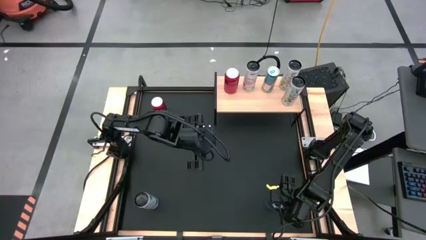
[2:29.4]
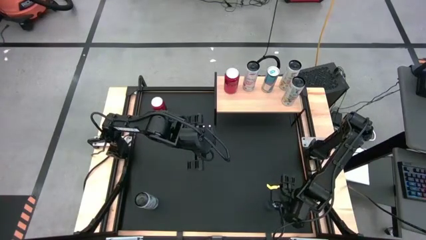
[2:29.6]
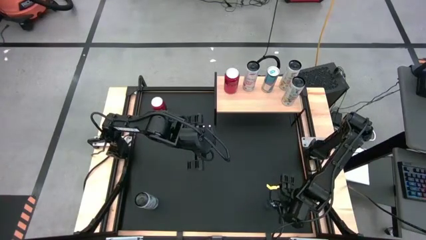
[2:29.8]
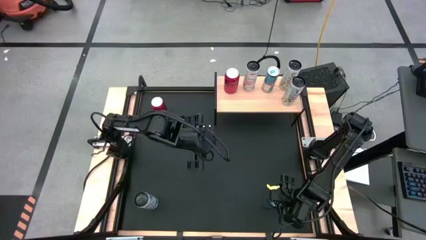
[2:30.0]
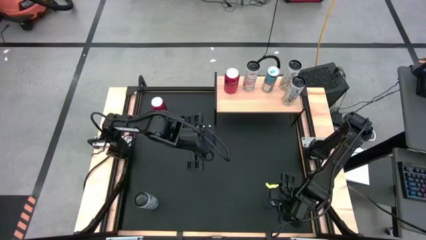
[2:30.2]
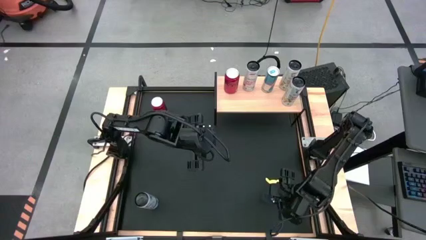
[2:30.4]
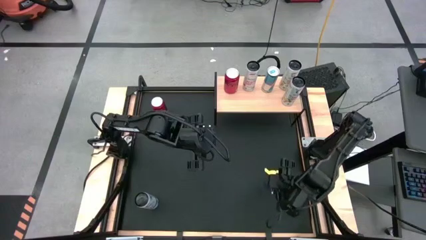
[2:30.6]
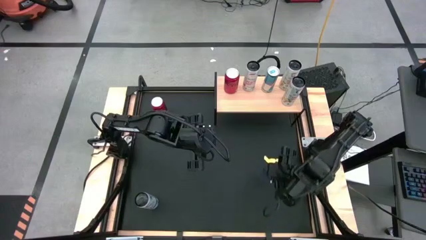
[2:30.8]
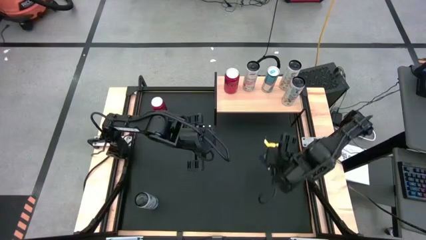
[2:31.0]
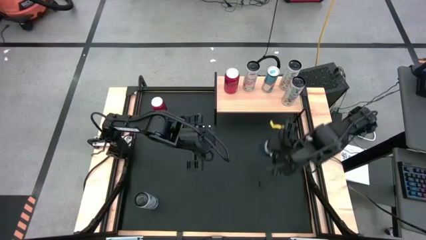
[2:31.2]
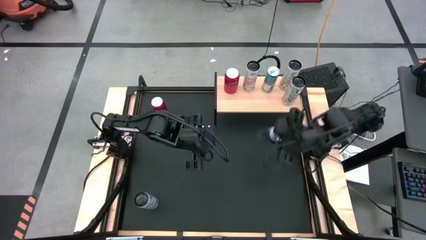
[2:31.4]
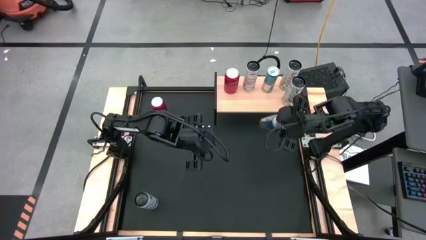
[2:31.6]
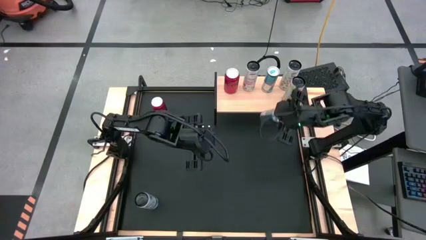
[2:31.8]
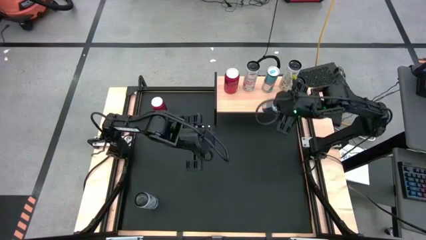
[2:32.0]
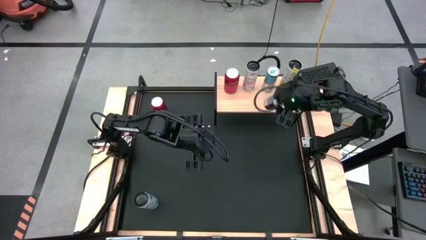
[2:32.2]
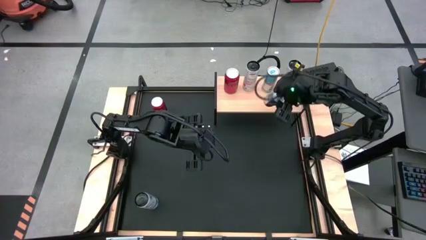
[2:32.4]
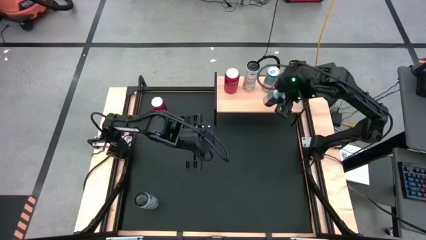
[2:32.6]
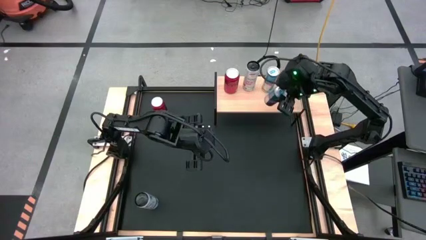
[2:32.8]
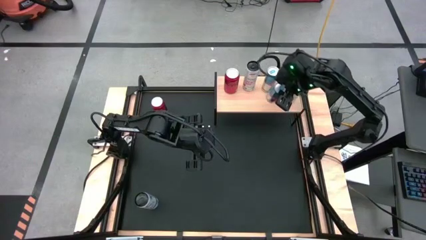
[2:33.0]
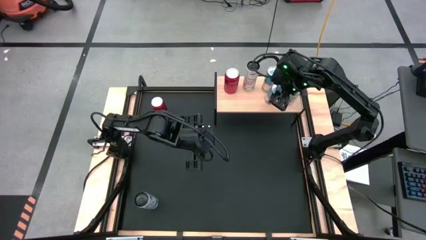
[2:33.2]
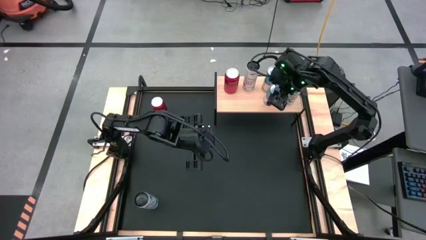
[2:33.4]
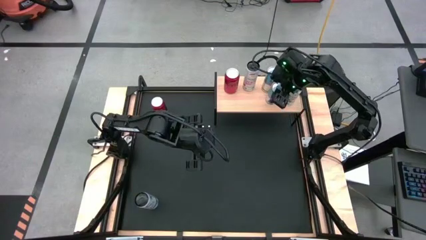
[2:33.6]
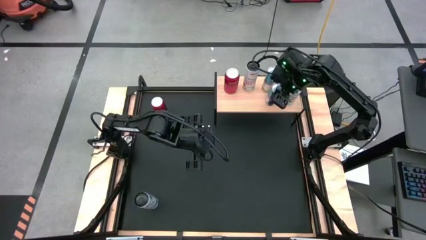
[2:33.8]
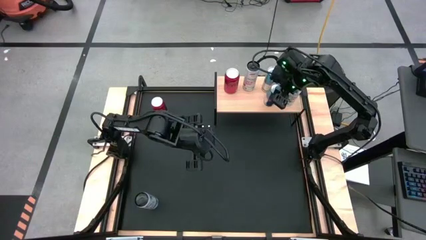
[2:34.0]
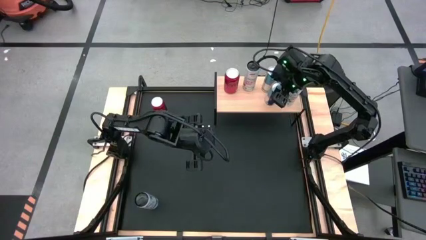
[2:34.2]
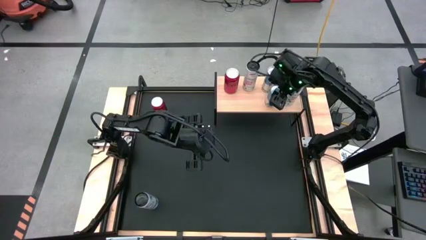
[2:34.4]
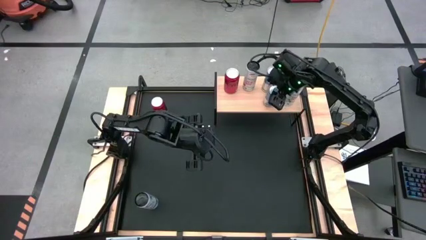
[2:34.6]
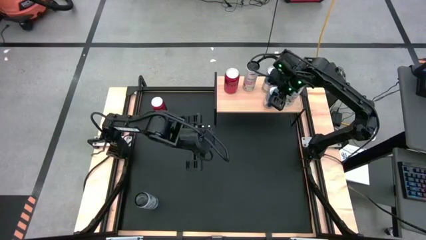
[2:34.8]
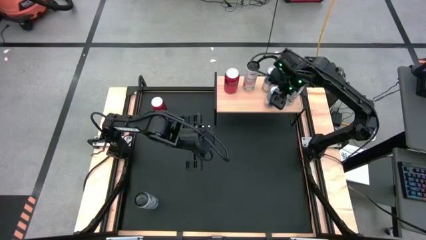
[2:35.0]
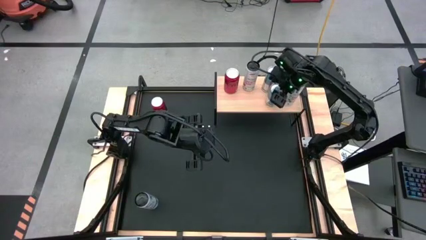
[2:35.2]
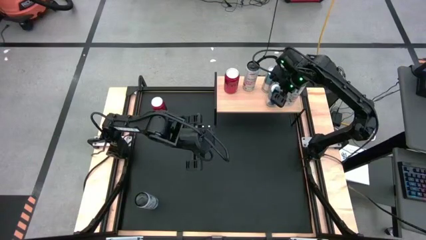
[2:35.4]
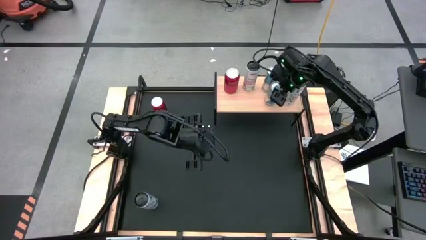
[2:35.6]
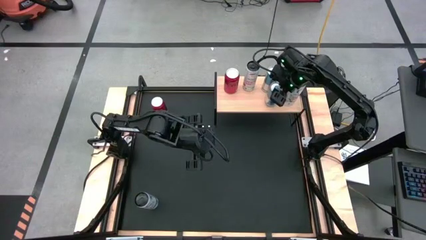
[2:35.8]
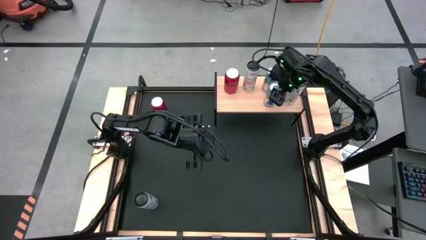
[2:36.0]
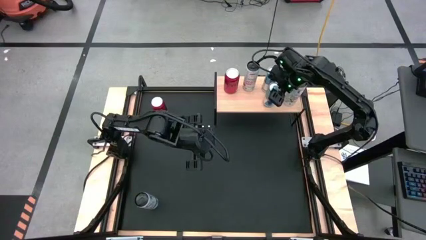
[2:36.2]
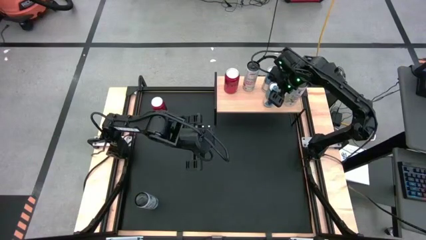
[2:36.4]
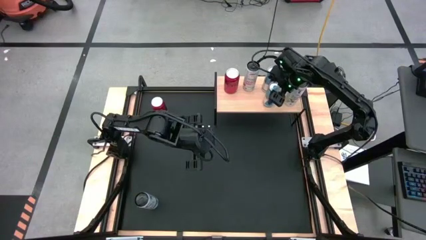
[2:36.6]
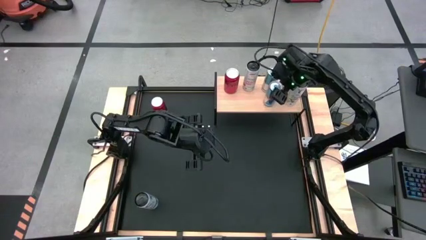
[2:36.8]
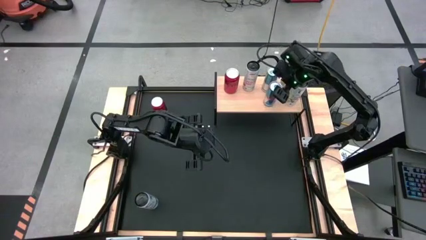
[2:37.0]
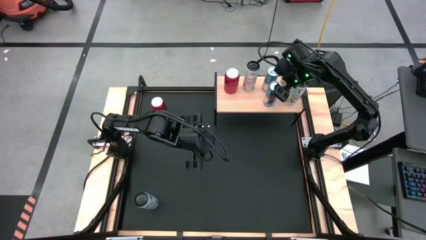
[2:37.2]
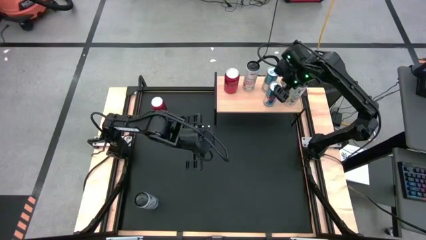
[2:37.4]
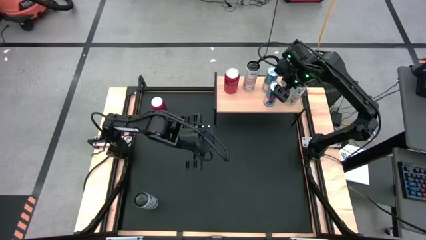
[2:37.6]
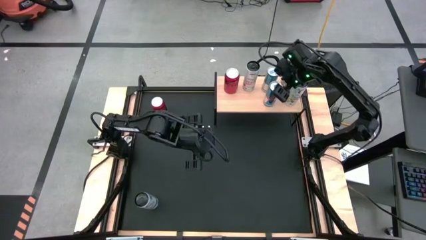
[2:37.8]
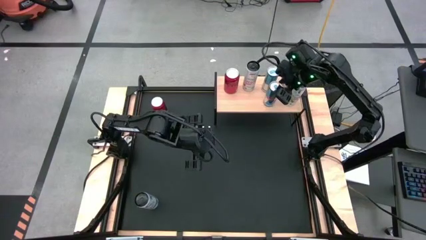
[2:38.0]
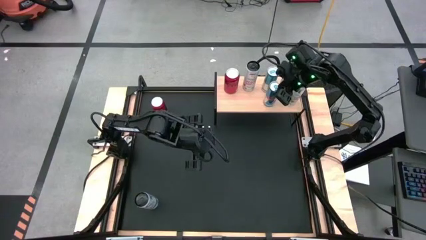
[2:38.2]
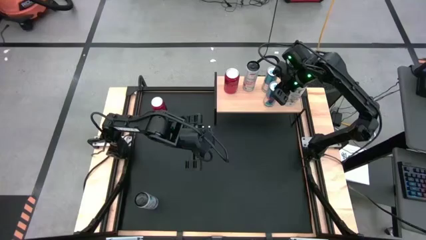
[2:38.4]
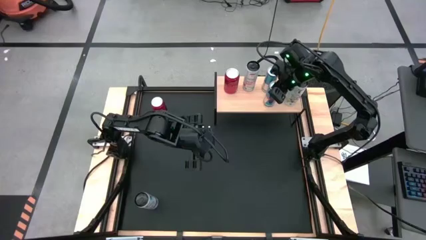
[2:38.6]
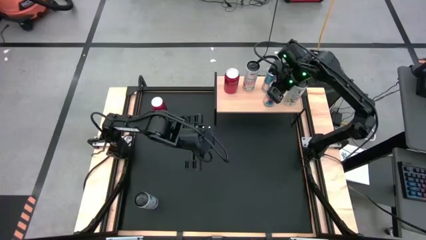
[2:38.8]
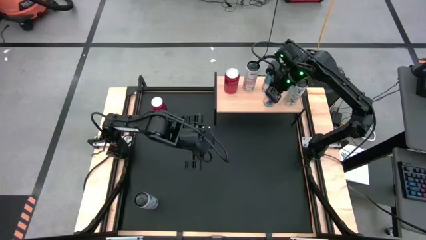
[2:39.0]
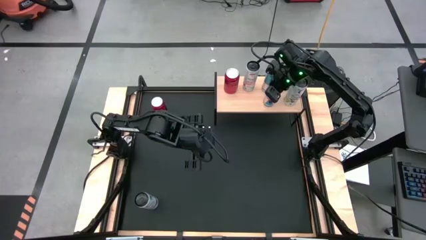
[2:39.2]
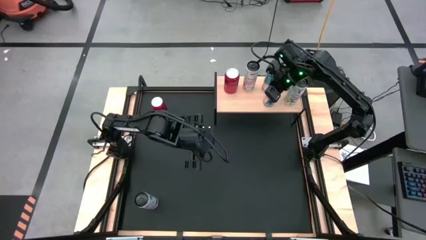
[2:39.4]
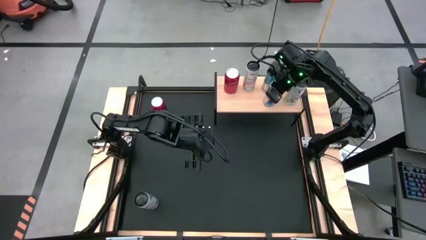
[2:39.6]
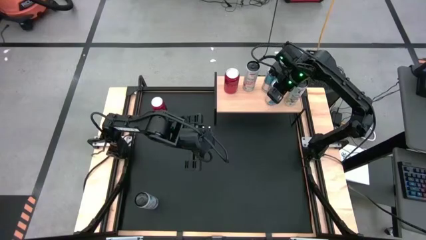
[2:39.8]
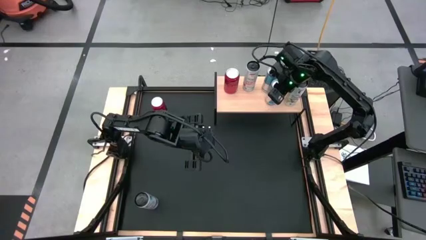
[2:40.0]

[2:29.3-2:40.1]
Task: Place canned beverage on shelf
Put the blue soda can on the shelf aligned with the other blue soda can
